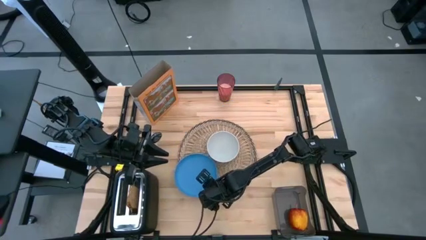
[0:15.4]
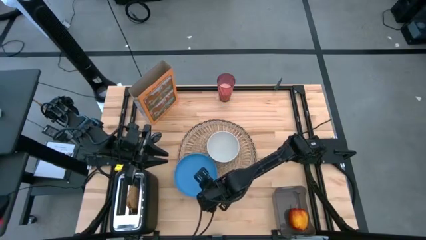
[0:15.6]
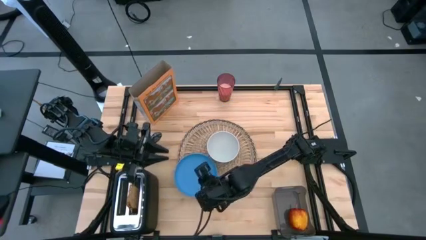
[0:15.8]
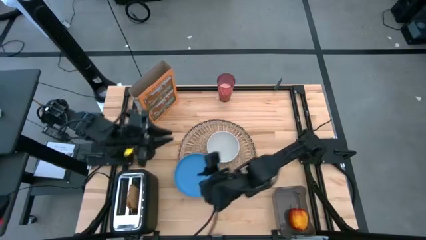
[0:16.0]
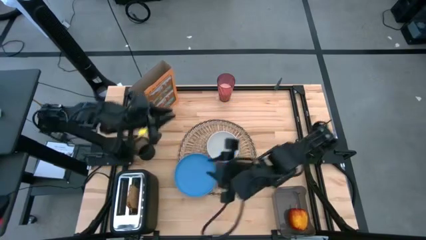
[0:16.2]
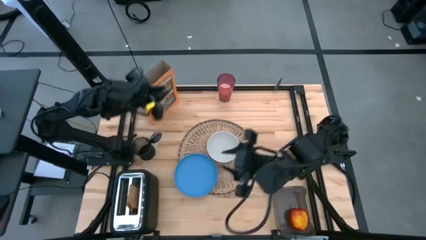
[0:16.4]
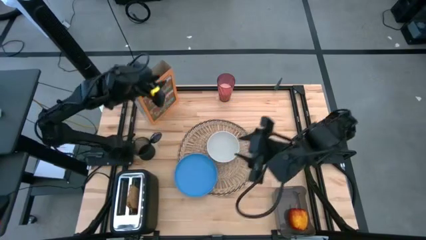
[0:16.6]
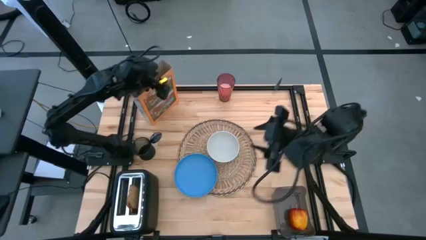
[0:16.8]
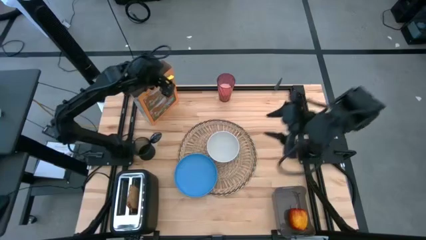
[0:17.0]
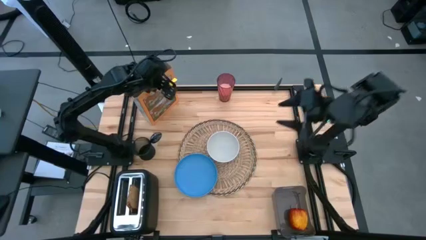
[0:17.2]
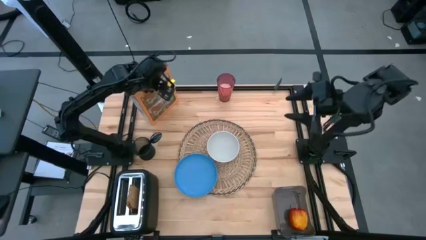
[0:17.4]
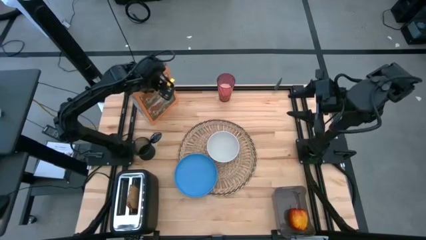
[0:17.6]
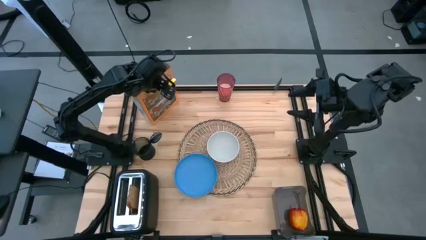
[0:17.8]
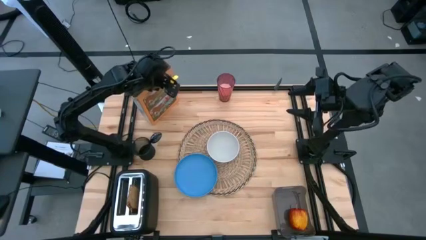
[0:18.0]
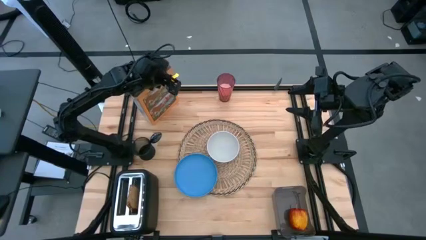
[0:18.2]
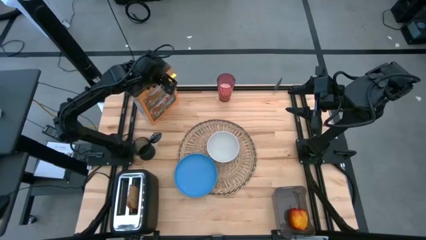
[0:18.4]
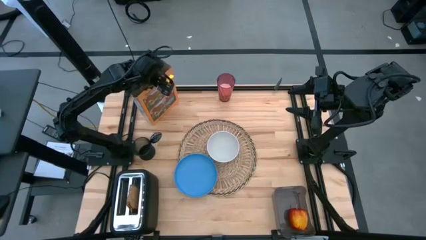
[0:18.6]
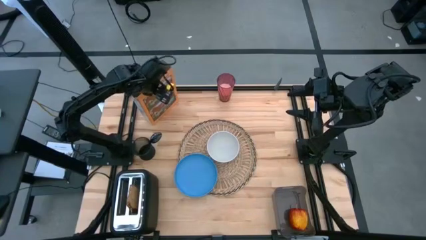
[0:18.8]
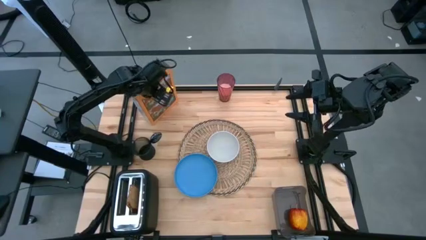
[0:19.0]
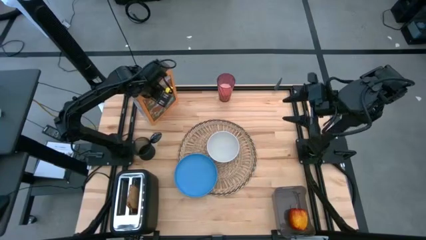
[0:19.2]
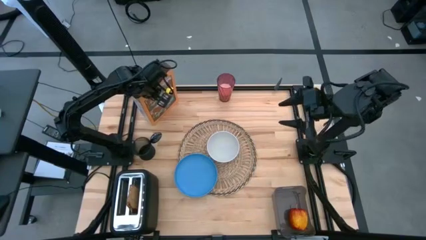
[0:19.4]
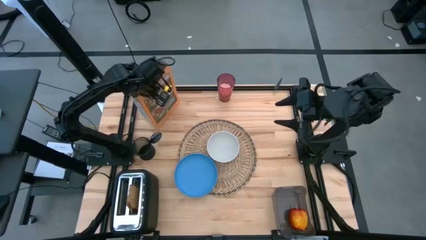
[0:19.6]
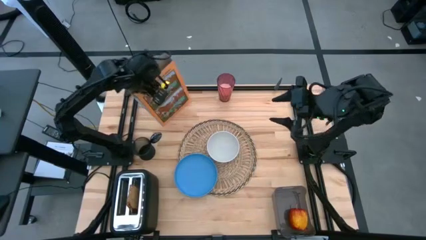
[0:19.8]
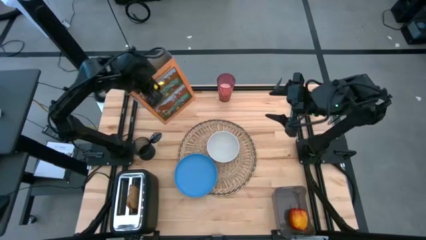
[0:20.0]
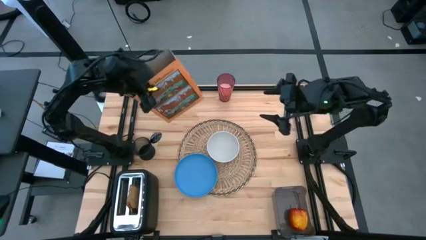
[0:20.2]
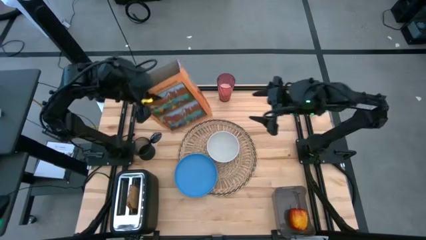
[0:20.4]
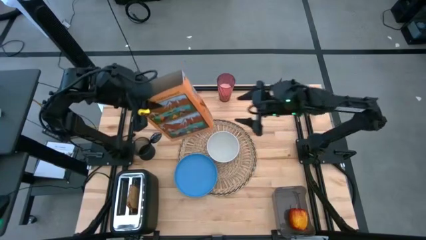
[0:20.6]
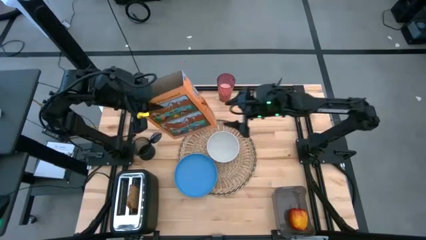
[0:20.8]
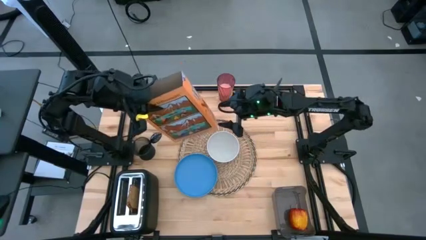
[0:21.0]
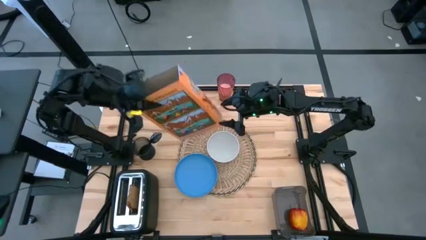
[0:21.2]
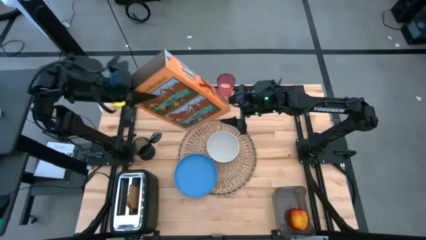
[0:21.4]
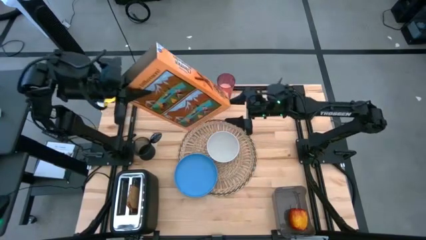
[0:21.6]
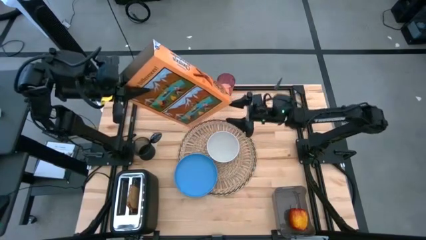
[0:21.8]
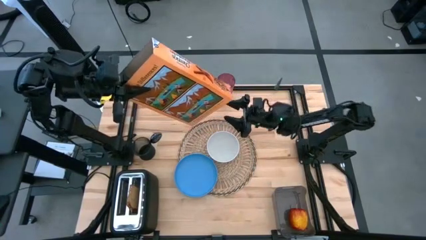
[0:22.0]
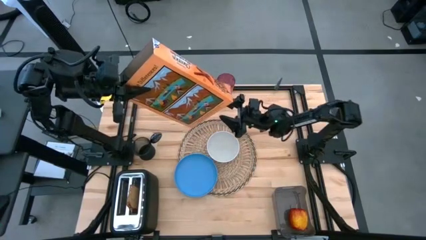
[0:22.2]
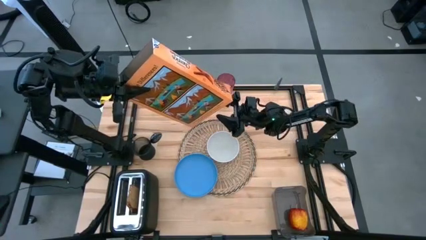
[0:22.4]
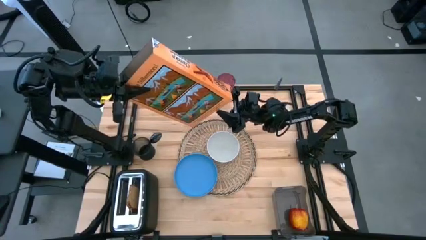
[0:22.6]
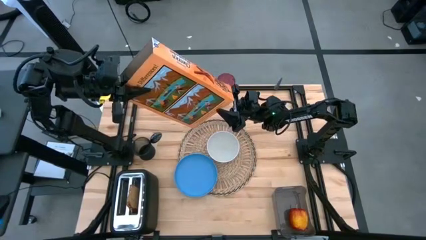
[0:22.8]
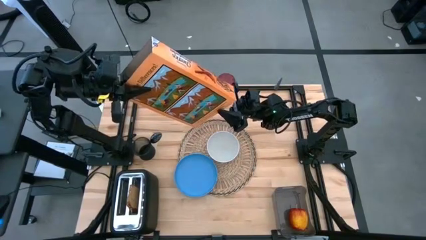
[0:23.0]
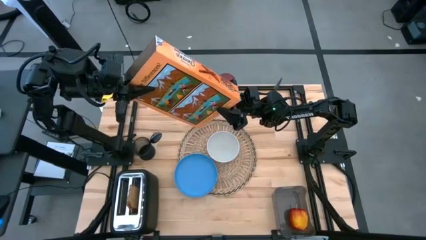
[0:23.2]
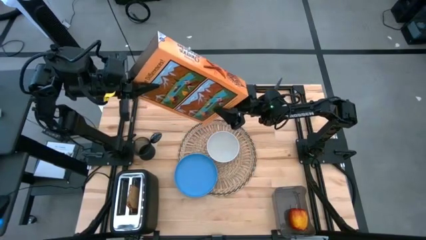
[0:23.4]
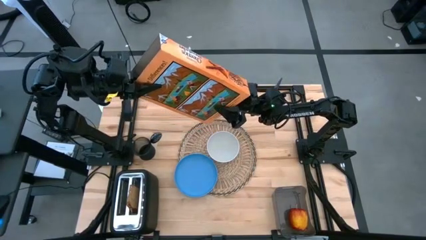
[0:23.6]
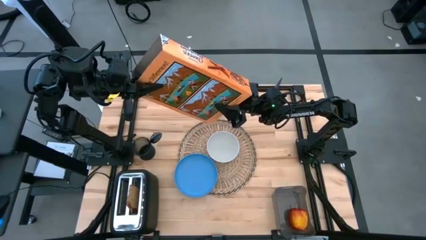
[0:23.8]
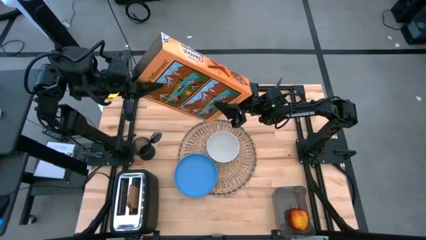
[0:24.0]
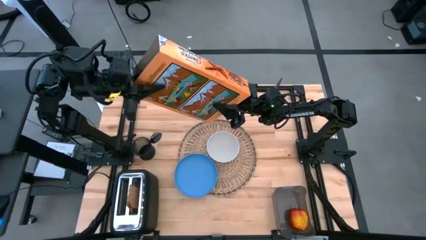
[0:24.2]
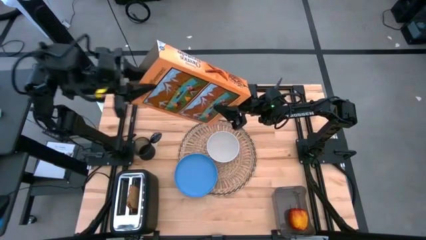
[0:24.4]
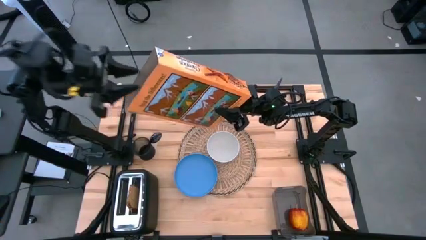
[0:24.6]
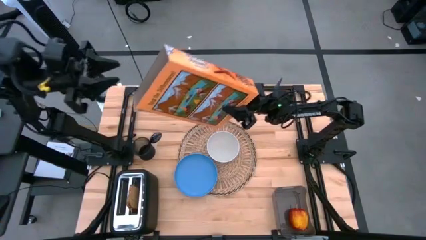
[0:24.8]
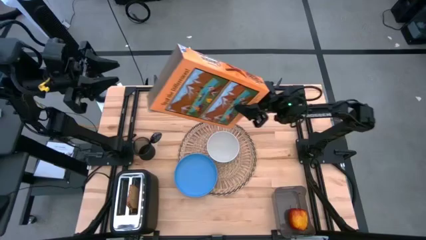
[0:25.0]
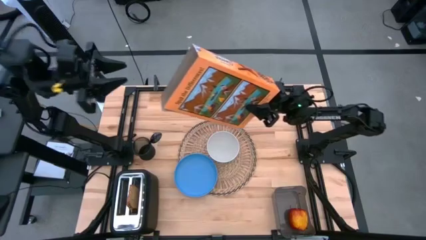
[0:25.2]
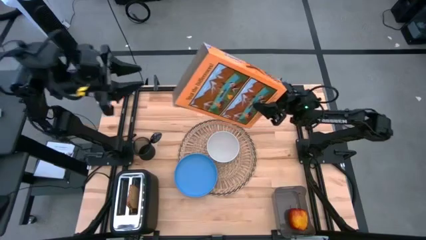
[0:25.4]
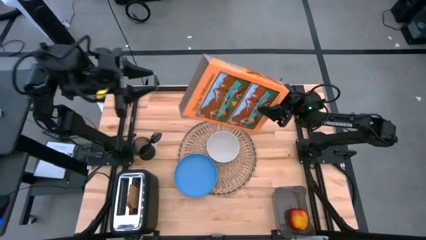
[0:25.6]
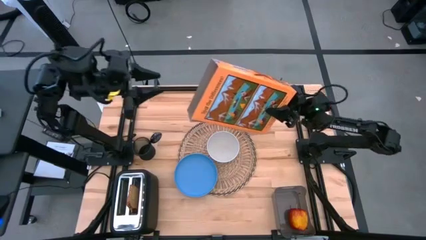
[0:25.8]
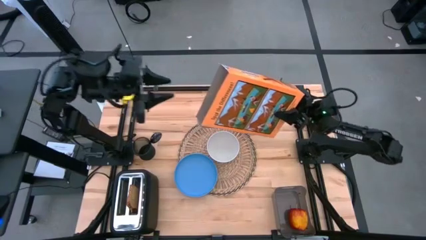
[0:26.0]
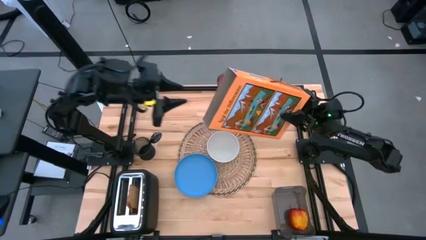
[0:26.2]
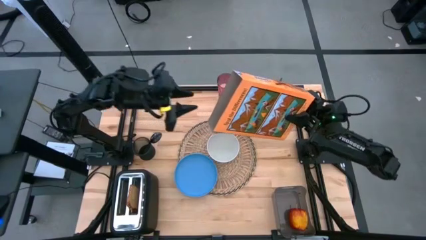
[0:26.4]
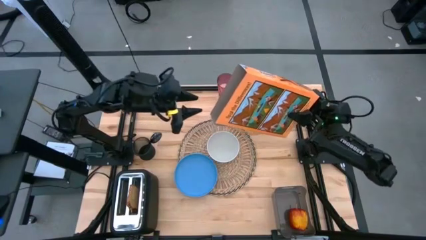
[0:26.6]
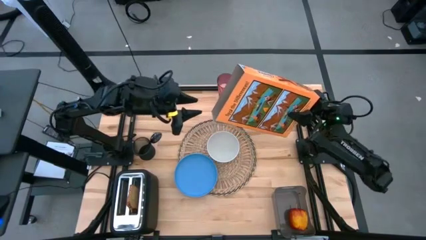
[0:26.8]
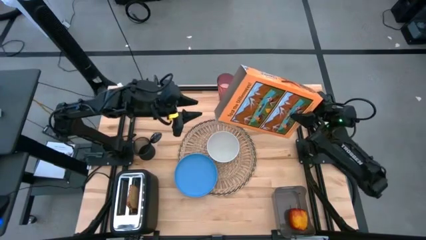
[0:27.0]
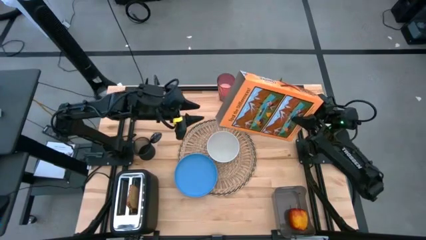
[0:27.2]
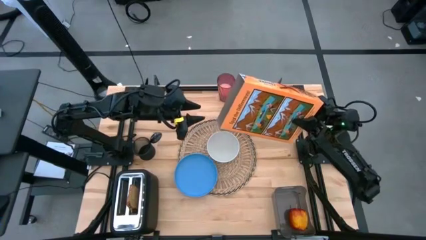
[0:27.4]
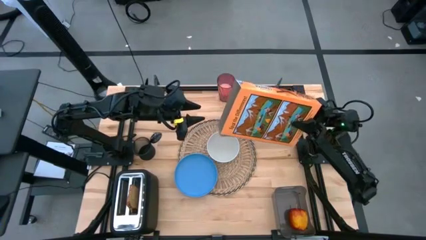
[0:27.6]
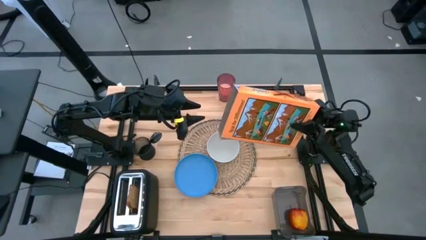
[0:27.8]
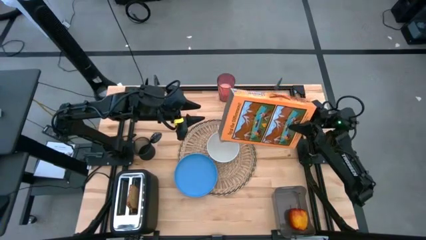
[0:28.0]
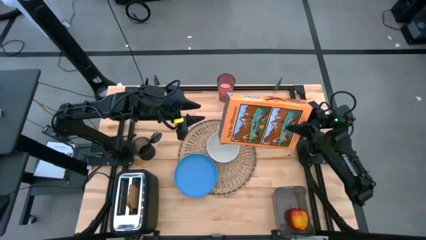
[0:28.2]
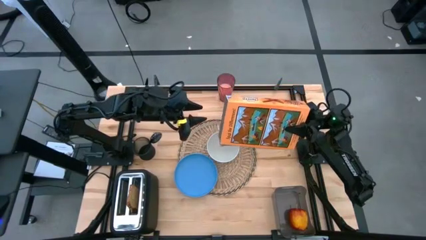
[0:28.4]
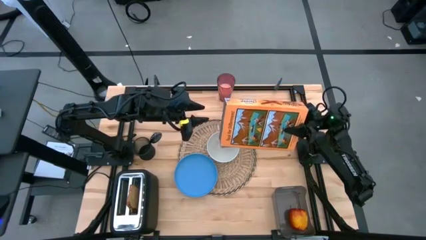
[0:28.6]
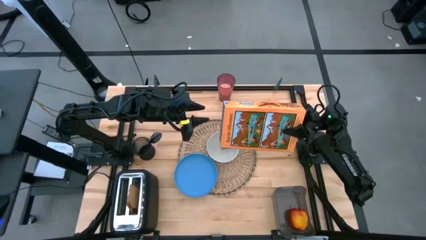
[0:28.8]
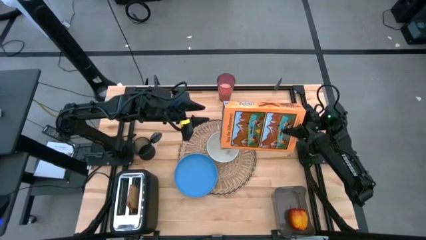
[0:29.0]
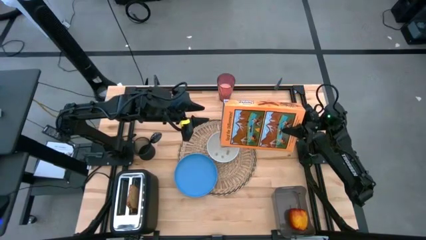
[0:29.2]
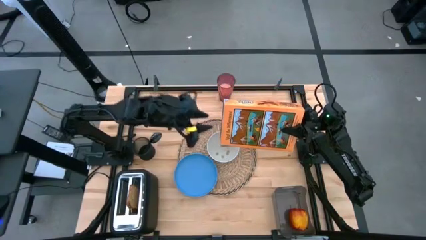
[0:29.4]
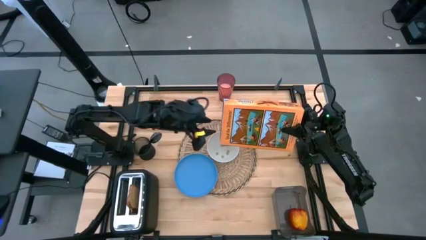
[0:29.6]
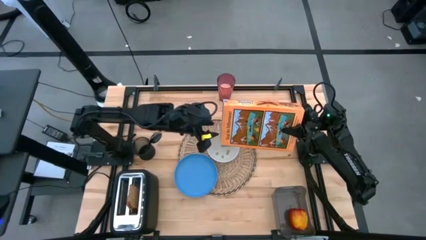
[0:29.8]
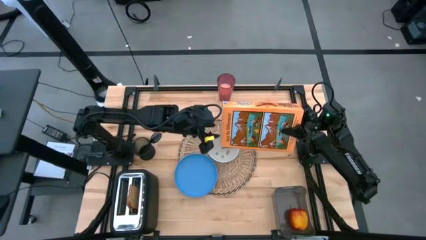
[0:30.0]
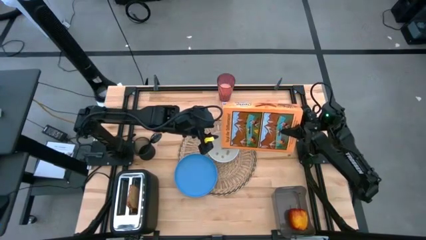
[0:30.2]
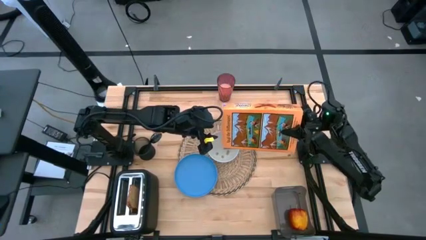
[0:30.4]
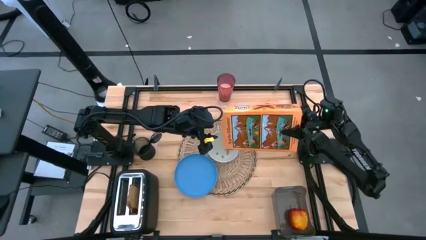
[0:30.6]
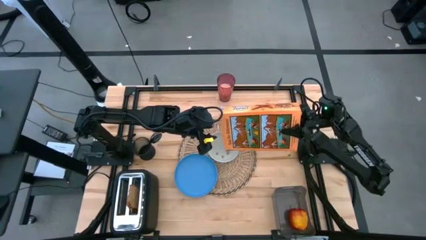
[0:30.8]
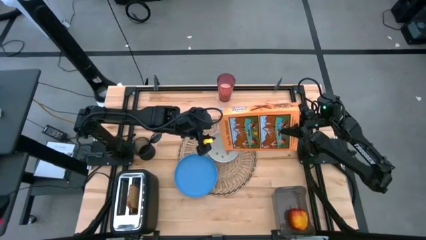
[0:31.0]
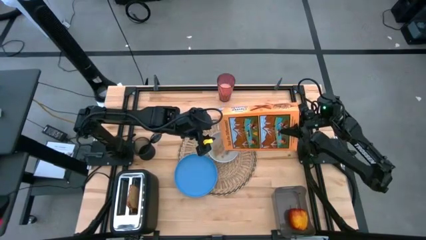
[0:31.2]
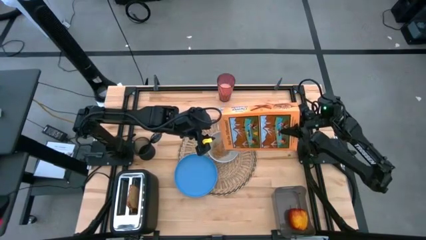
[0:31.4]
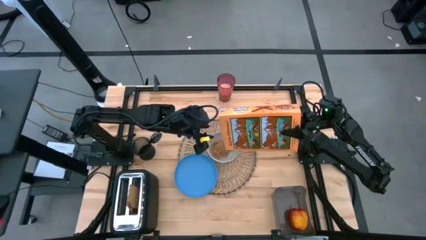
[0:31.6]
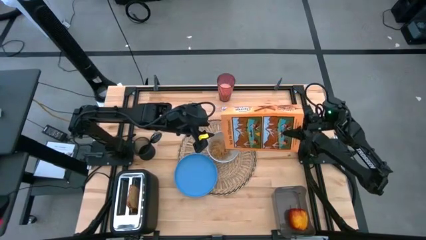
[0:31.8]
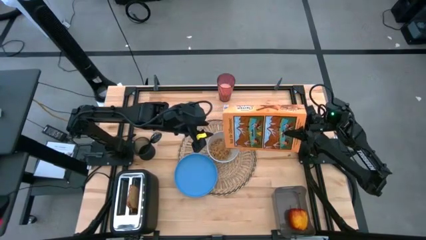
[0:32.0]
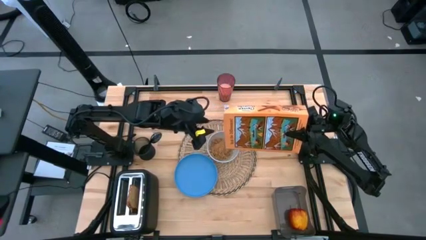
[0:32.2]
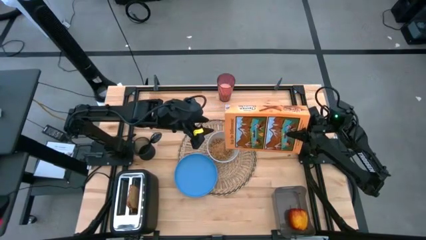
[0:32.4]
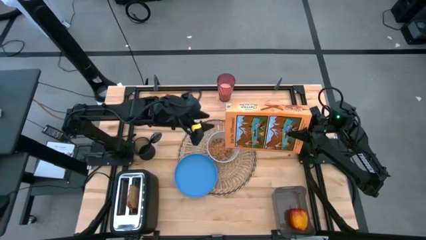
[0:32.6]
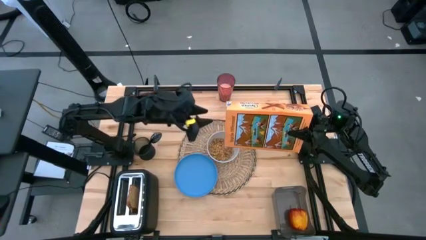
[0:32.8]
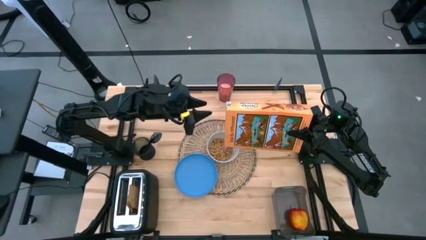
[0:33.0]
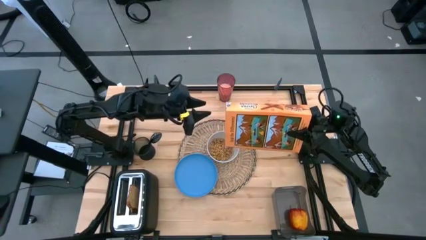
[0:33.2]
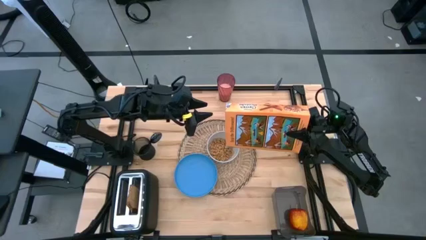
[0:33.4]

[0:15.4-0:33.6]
Task: Arrange a breakfast setting
Pour the cereal into the white bowl
